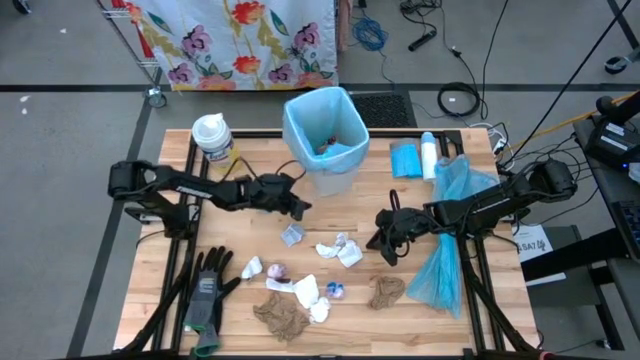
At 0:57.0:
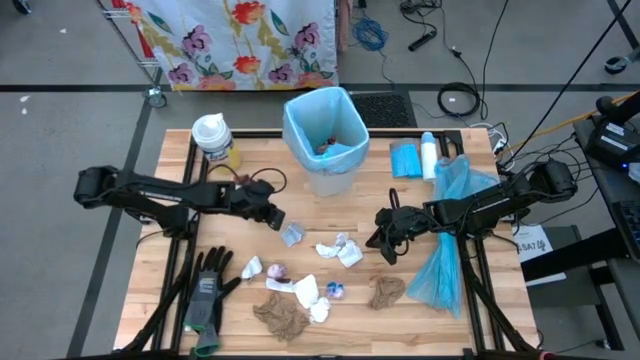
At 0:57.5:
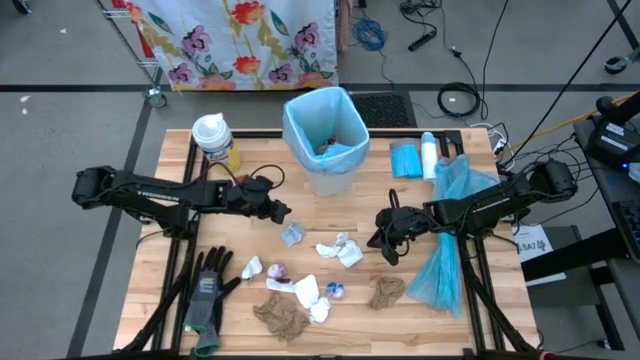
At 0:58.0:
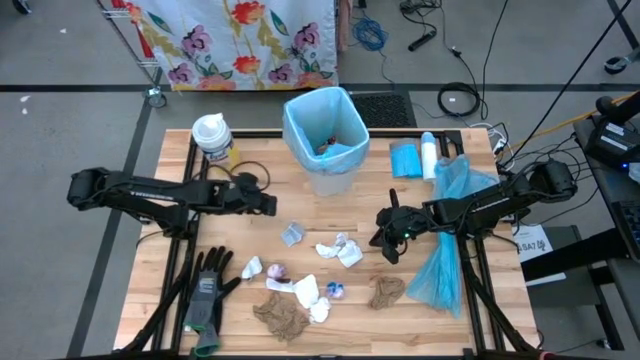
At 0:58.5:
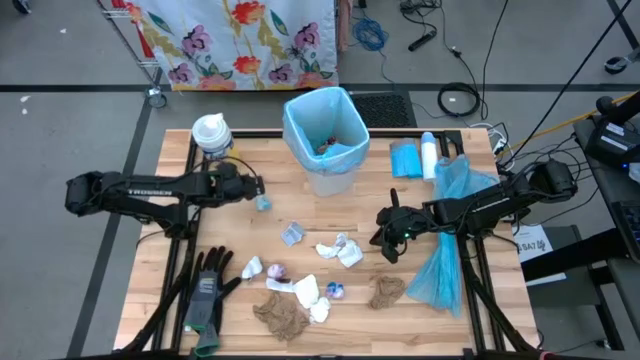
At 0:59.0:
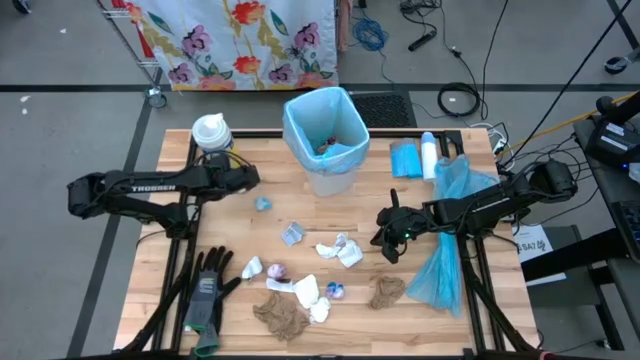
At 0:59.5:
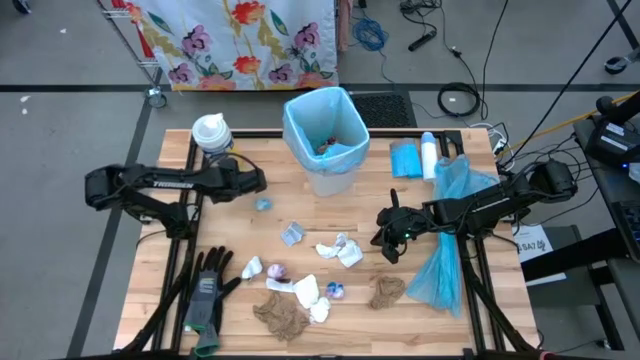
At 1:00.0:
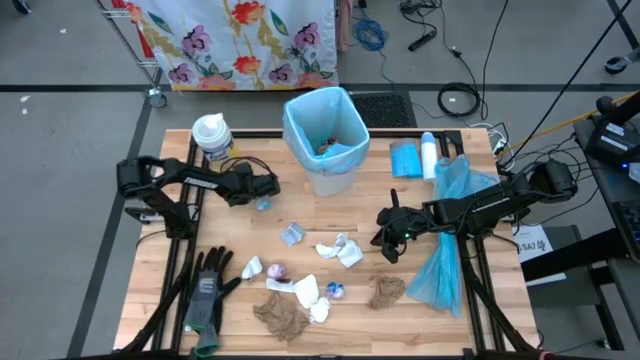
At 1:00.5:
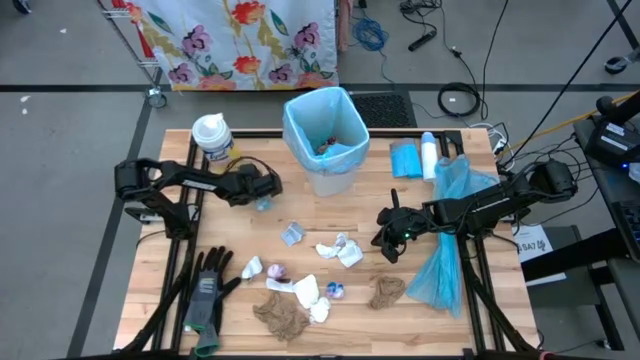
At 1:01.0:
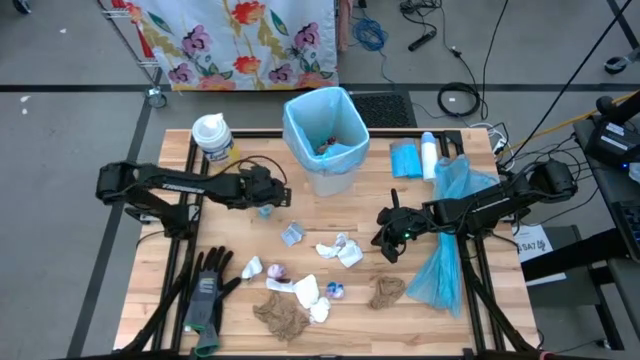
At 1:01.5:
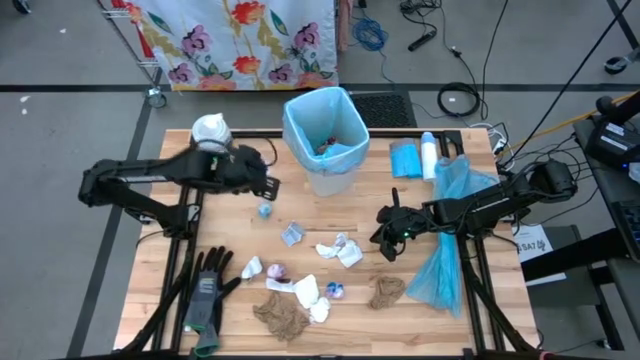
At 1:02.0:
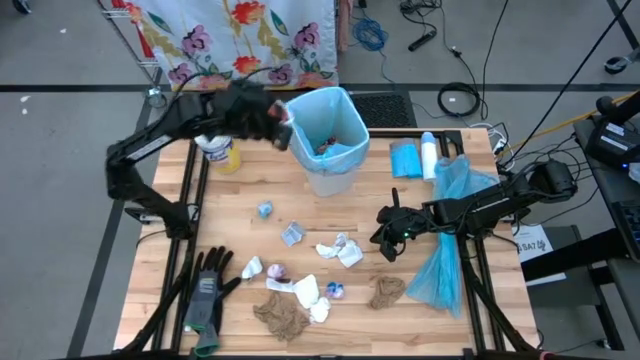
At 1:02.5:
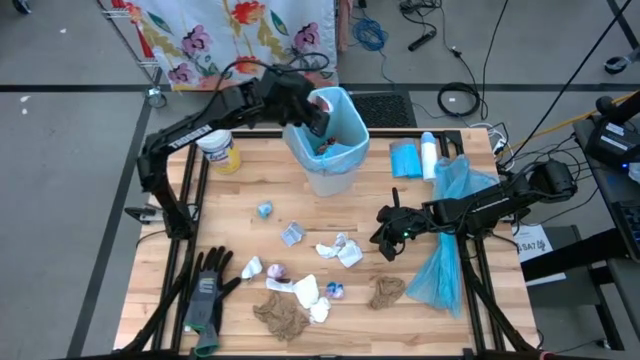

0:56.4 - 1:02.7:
Task: place trash/remove bag and relplace
Put the white paper into the trash bin

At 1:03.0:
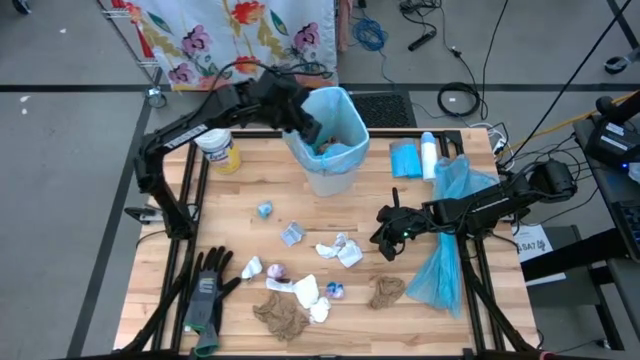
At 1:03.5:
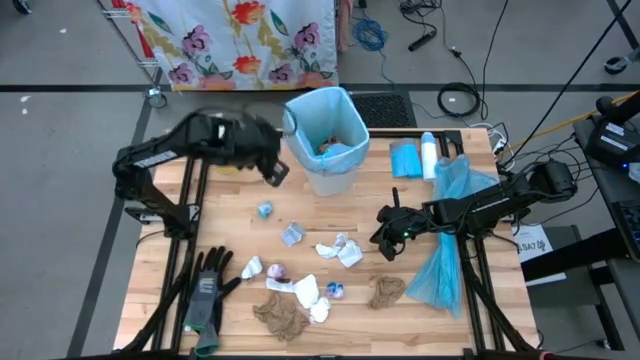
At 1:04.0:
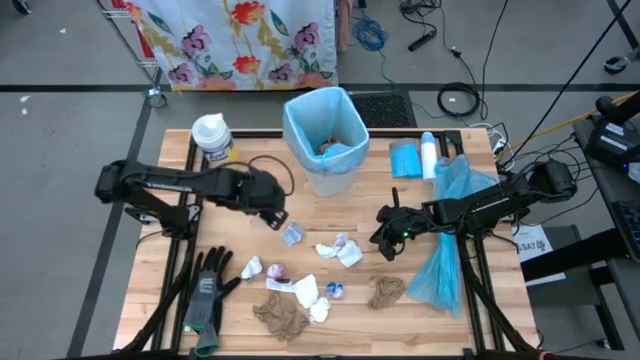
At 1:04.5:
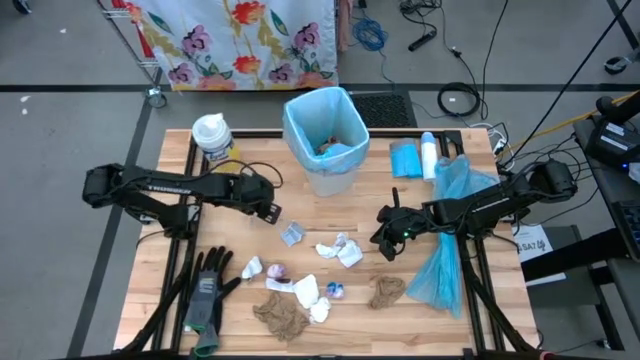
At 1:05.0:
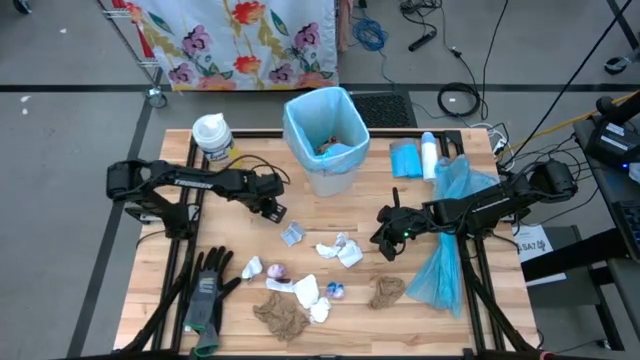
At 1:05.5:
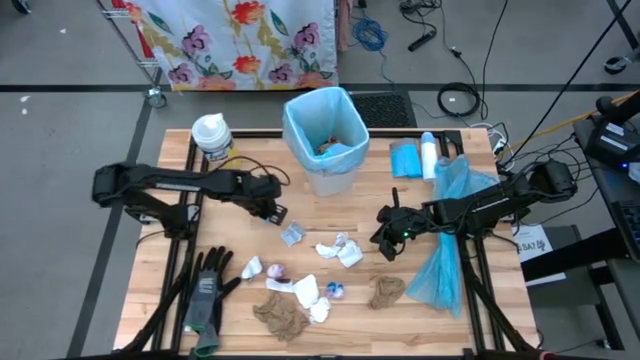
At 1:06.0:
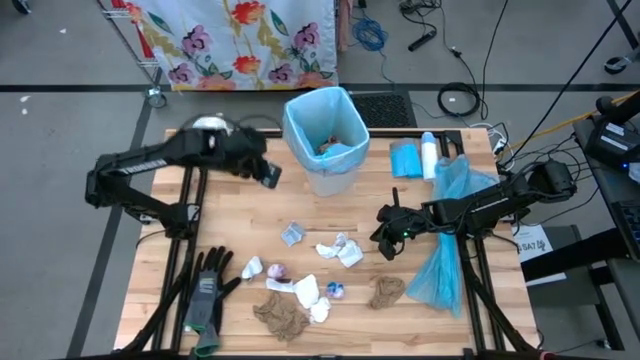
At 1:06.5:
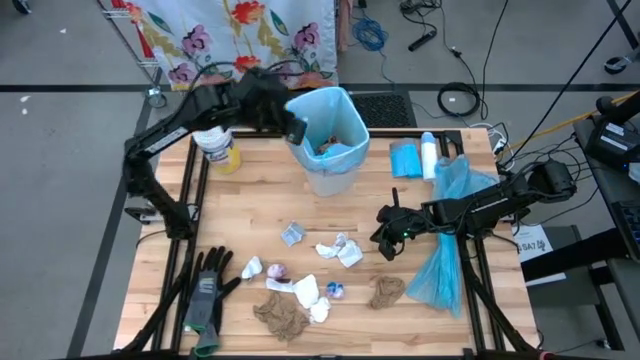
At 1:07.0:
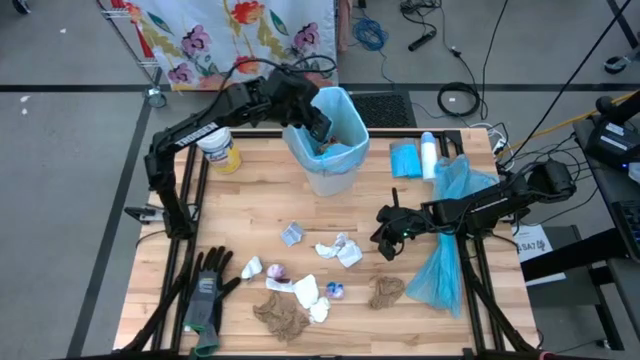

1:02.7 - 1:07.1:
Put the blue plastic into the trash bin

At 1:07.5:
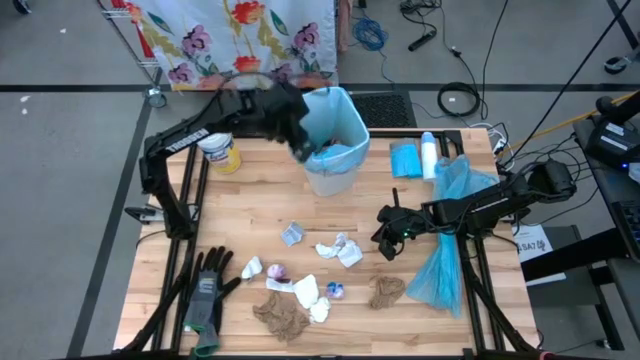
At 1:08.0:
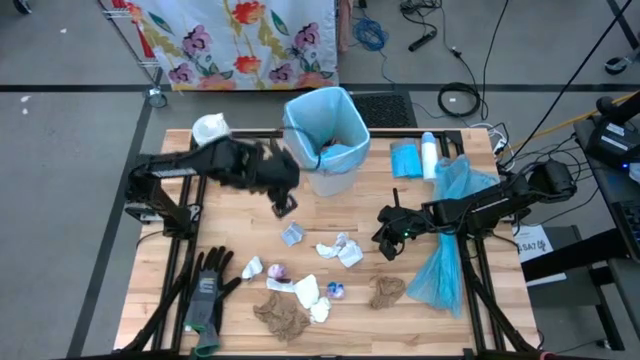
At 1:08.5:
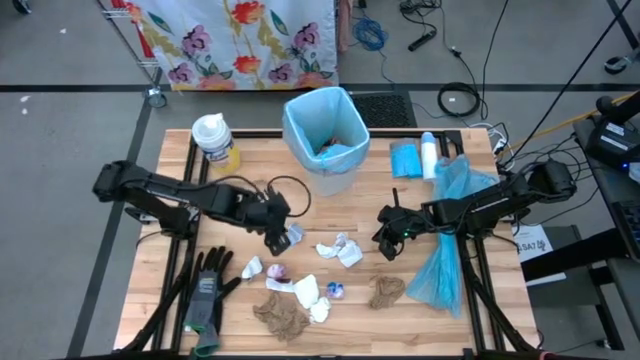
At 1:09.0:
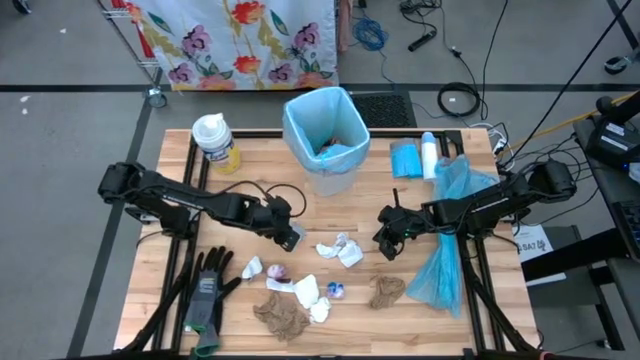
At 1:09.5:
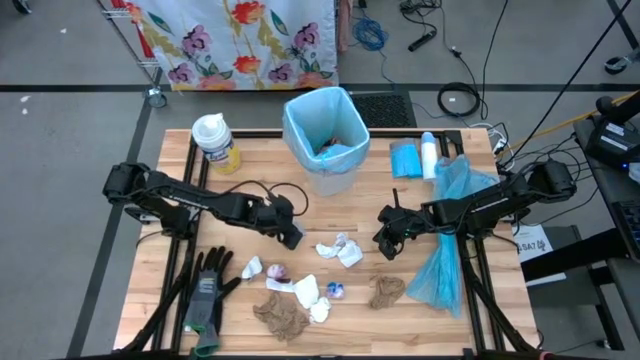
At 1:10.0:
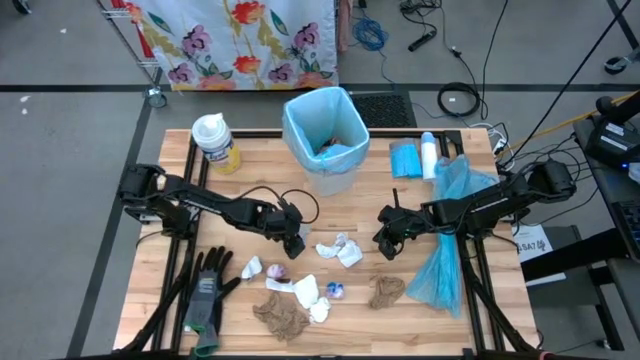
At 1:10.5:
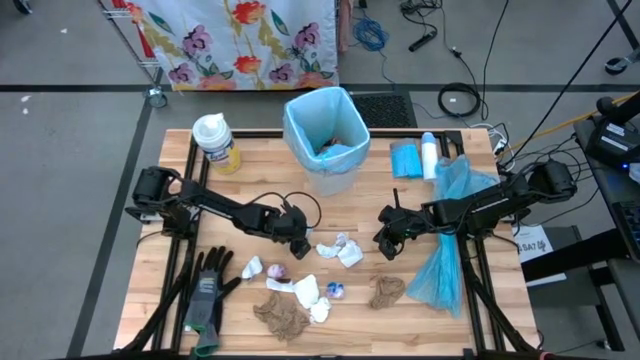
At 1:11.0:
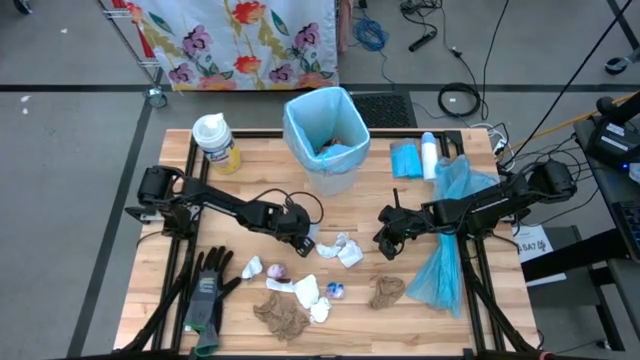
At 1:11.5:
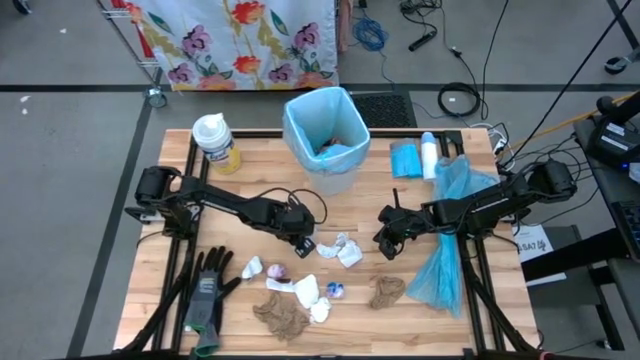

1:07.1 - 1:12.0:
Put the gray paper into the trash bin

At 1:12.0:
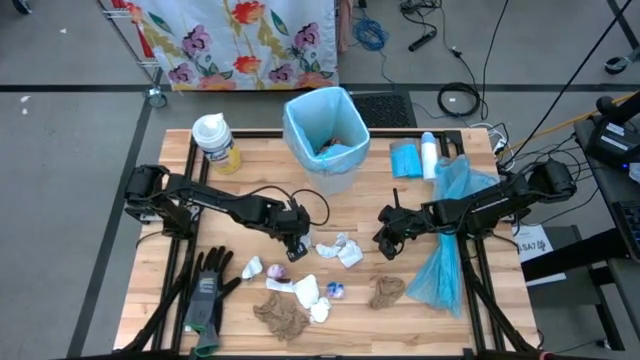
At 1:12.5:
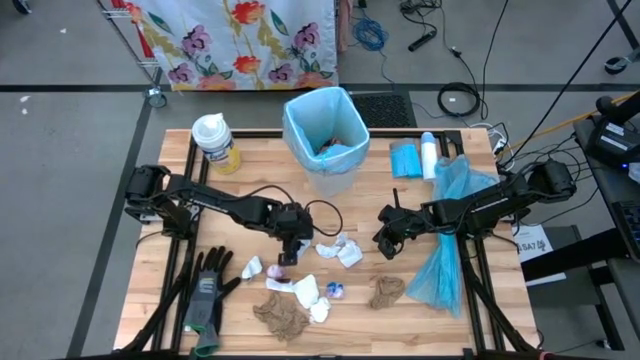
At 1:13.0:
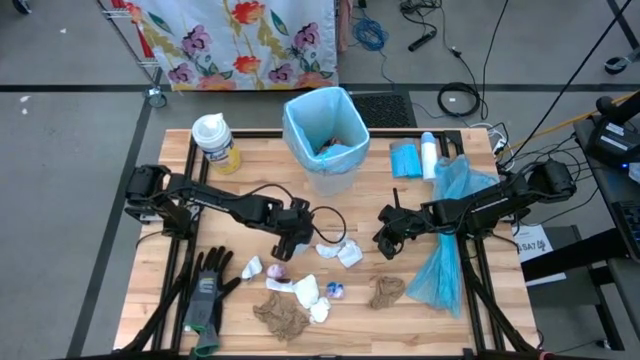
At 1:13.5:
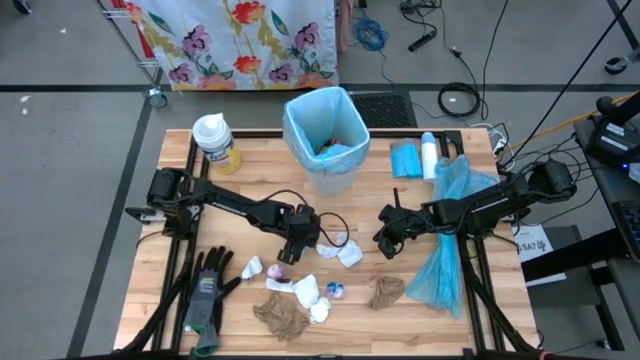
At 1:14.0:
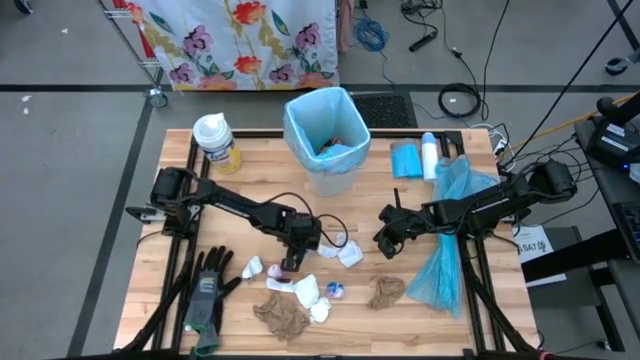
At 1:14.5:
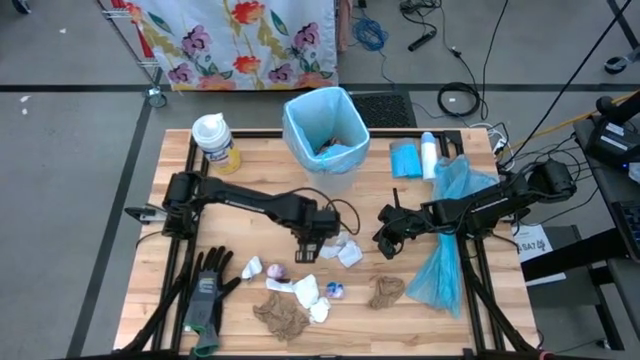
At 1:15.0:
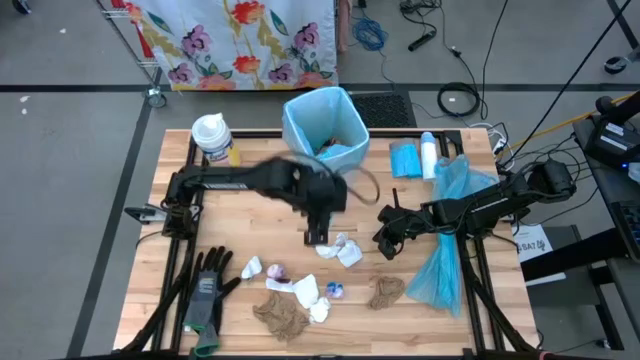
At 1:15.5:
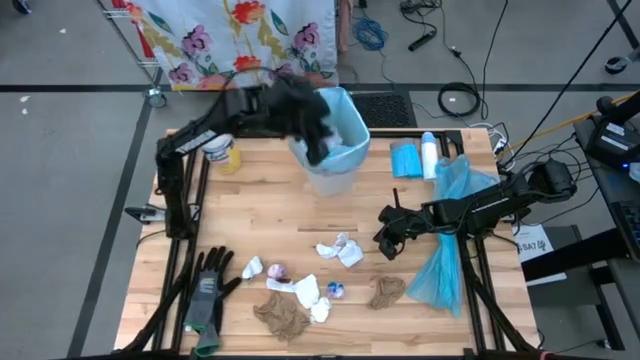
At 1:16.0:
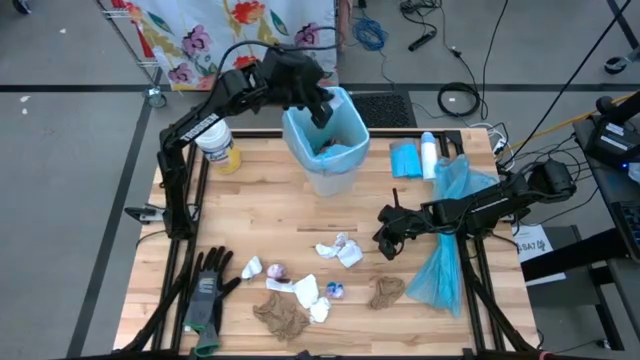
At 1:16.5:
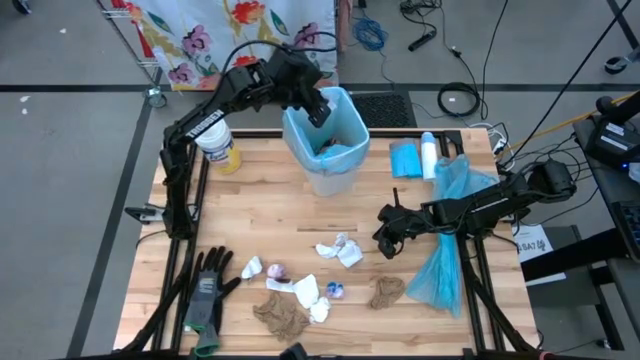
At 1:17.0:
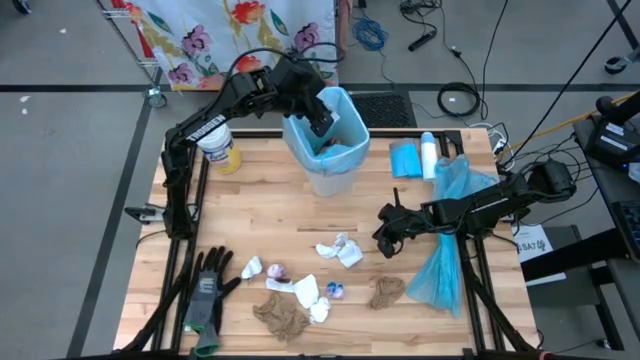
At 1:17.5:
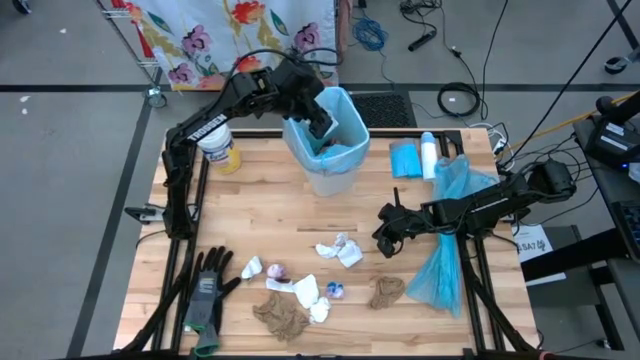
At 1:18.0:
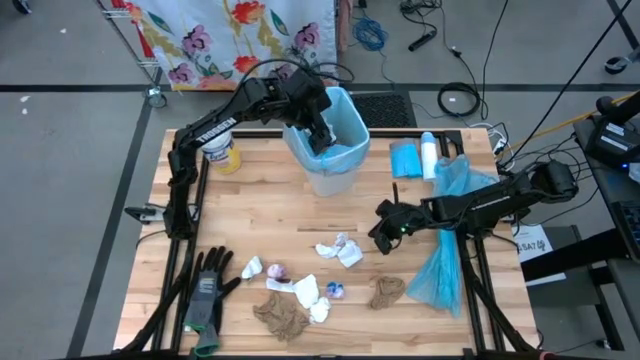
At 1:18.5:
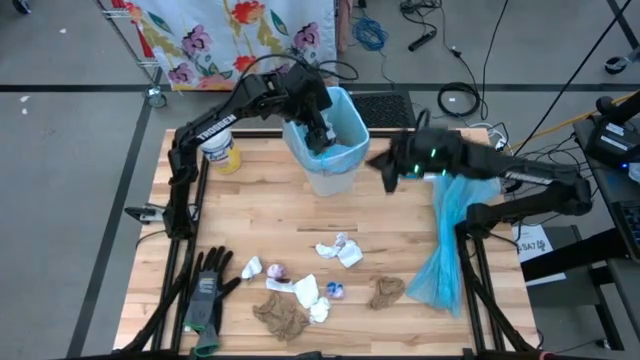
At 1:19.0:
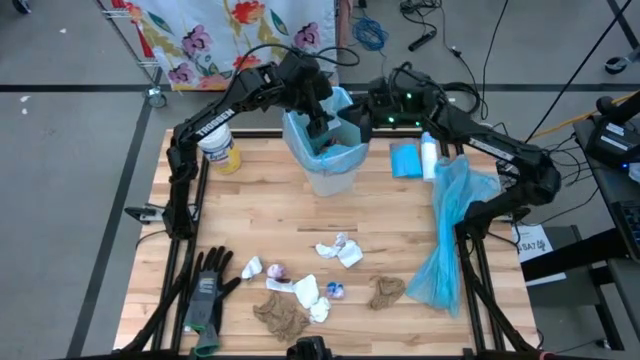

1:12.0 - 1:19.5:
Put the gray paper into the trash bin
